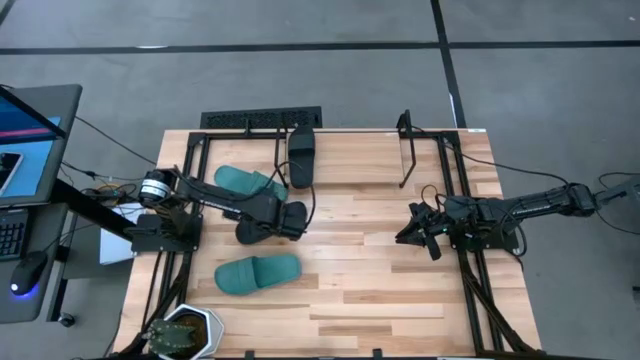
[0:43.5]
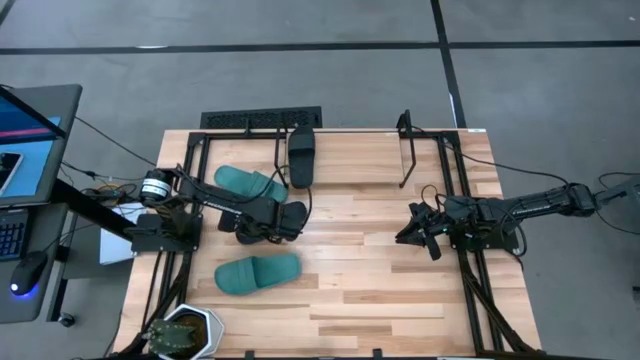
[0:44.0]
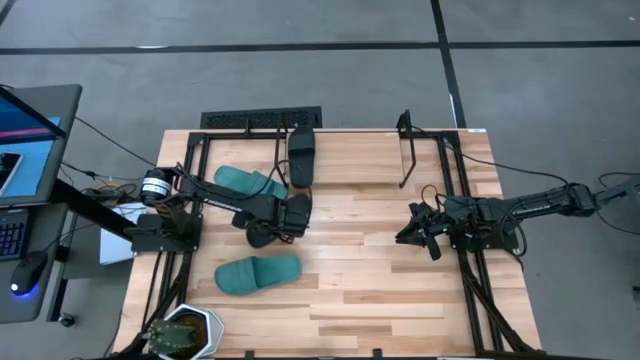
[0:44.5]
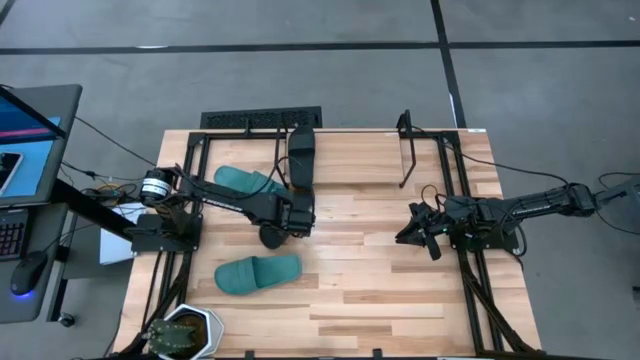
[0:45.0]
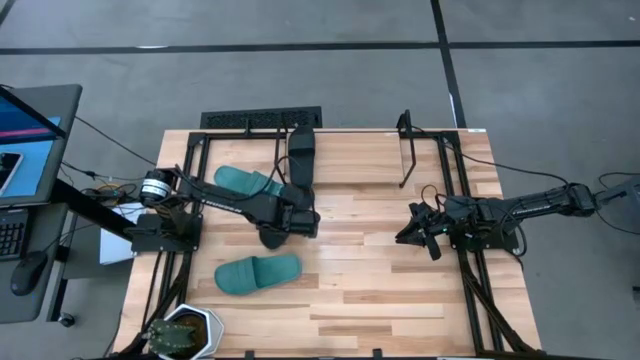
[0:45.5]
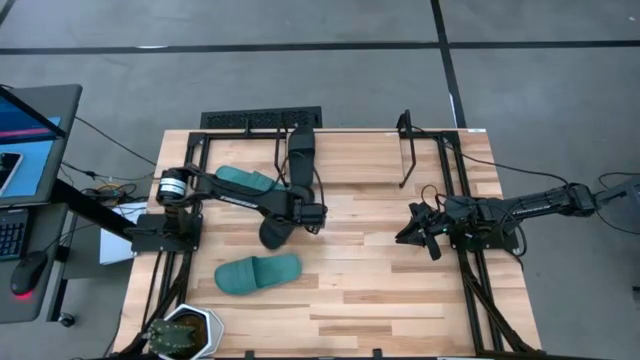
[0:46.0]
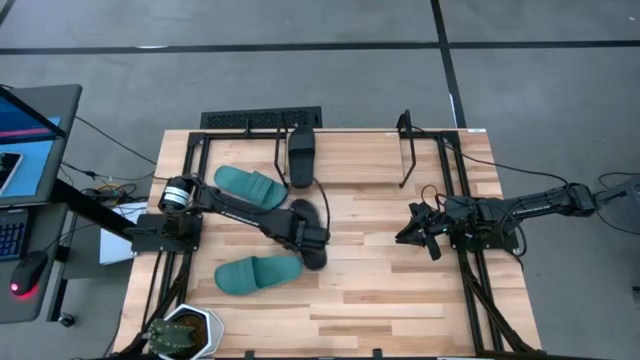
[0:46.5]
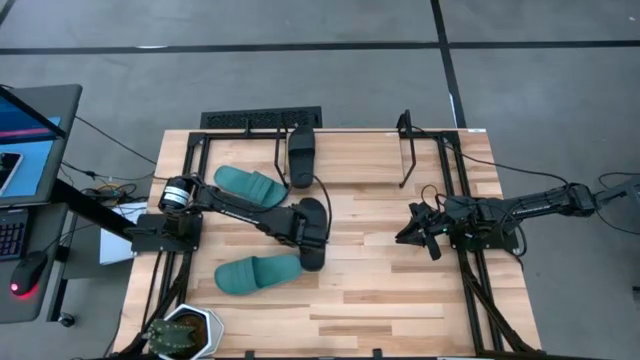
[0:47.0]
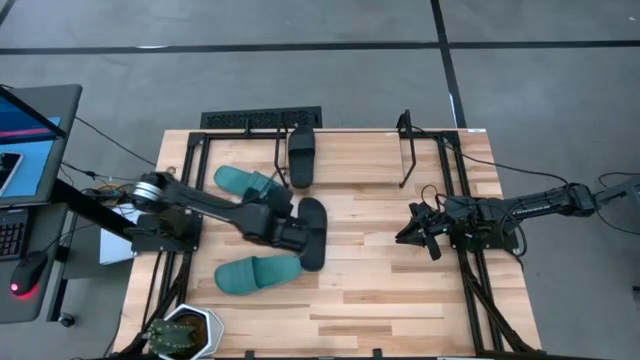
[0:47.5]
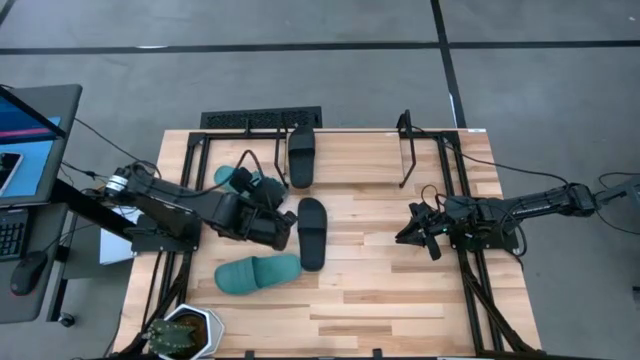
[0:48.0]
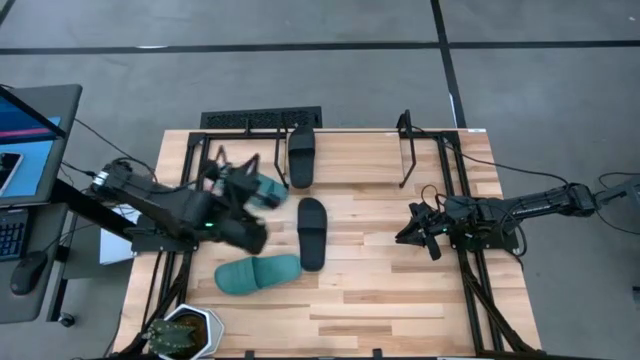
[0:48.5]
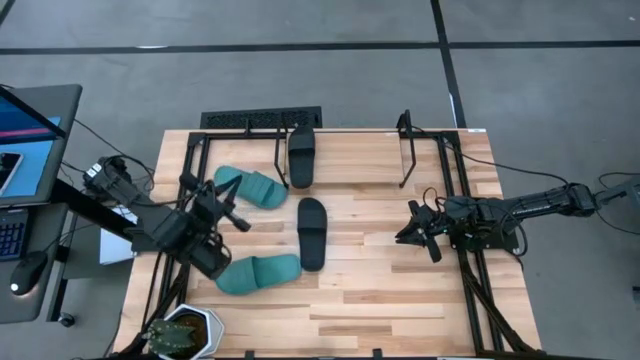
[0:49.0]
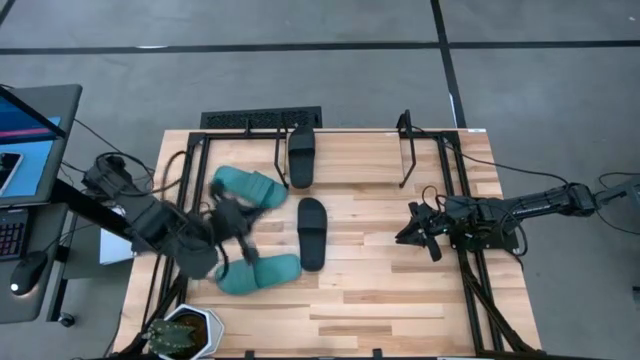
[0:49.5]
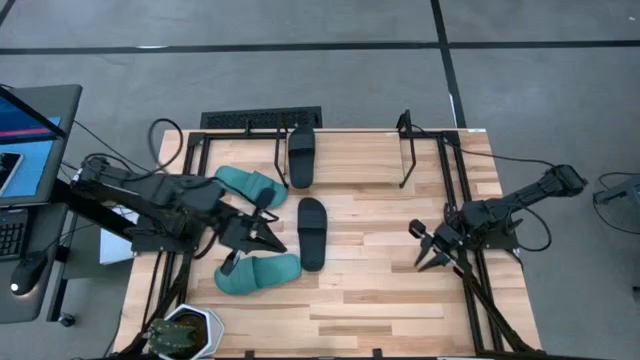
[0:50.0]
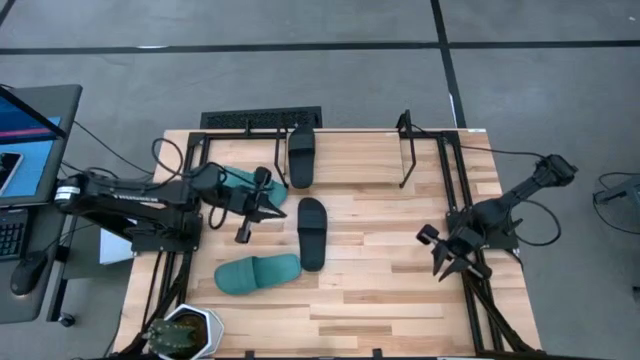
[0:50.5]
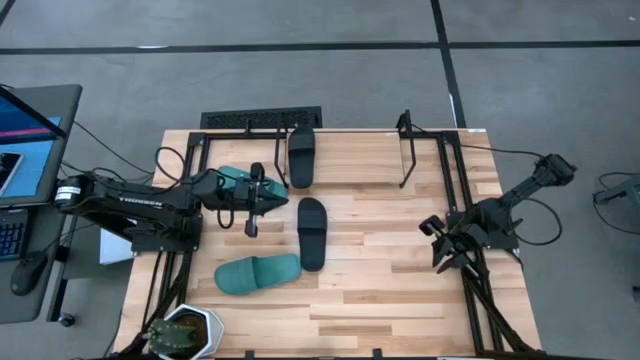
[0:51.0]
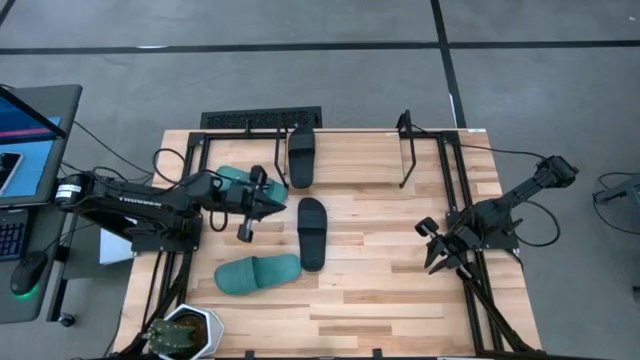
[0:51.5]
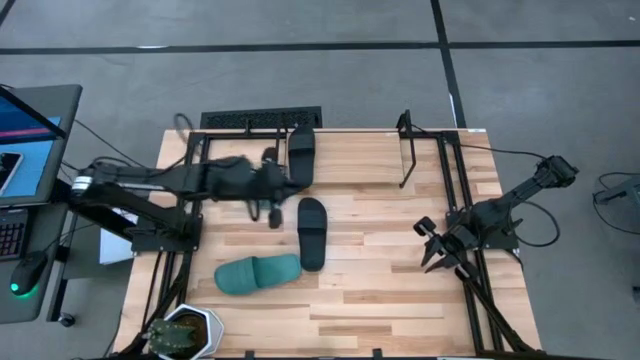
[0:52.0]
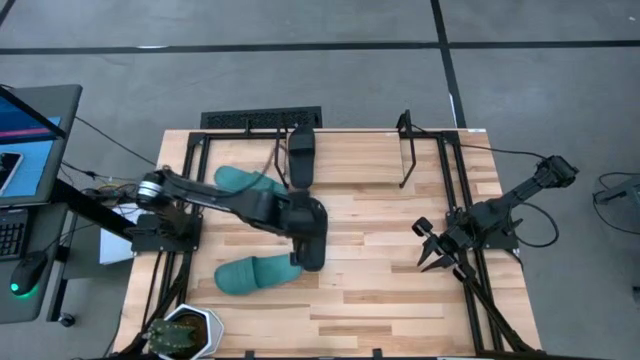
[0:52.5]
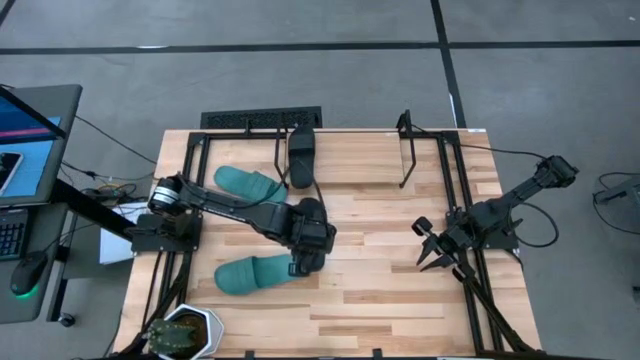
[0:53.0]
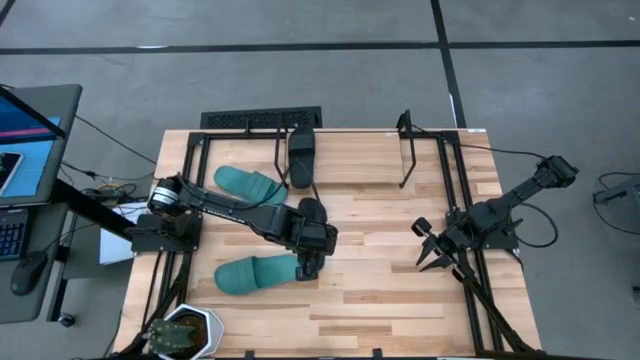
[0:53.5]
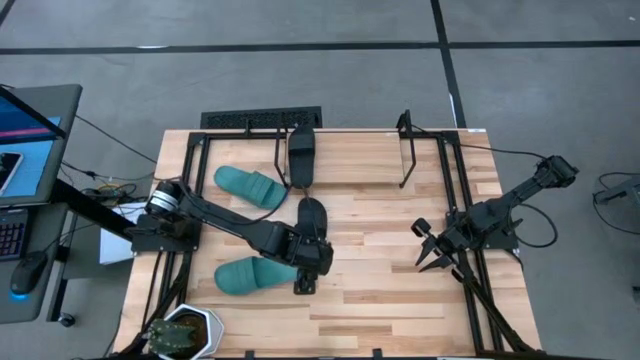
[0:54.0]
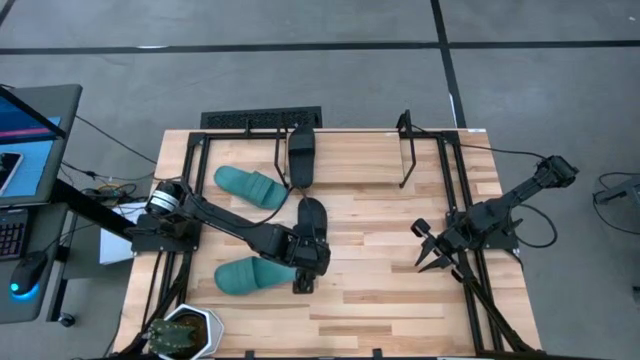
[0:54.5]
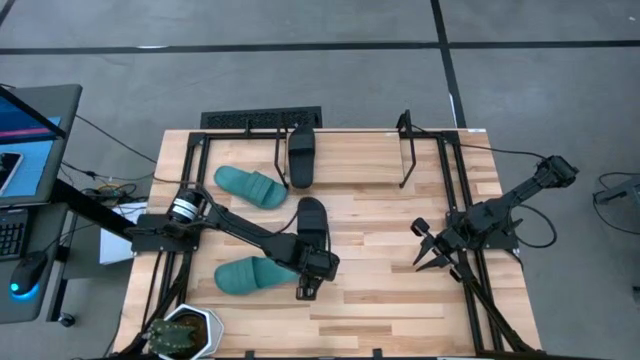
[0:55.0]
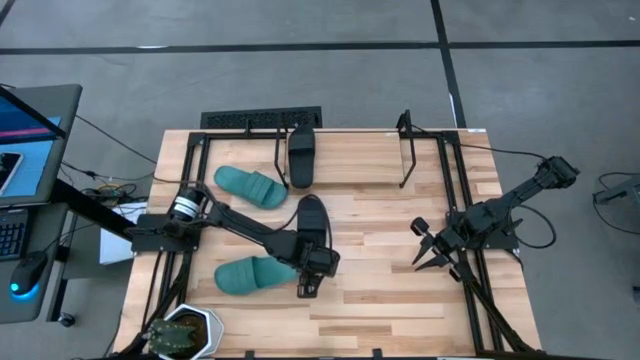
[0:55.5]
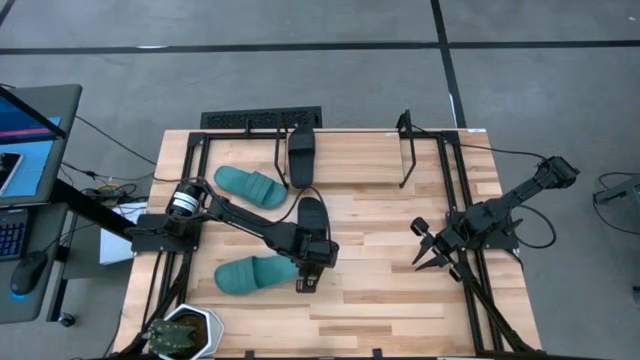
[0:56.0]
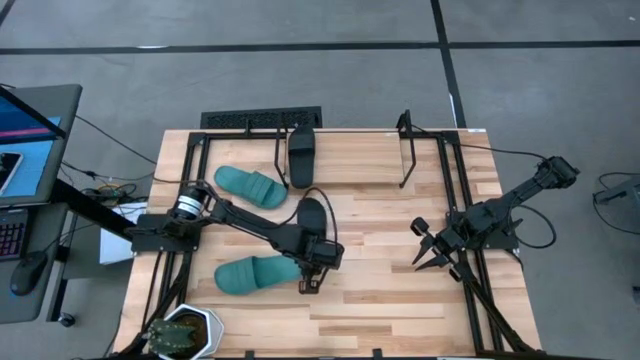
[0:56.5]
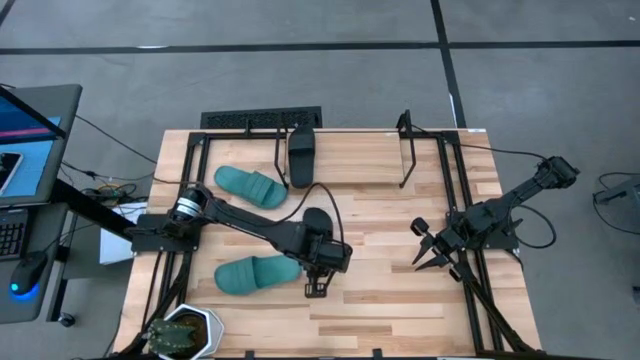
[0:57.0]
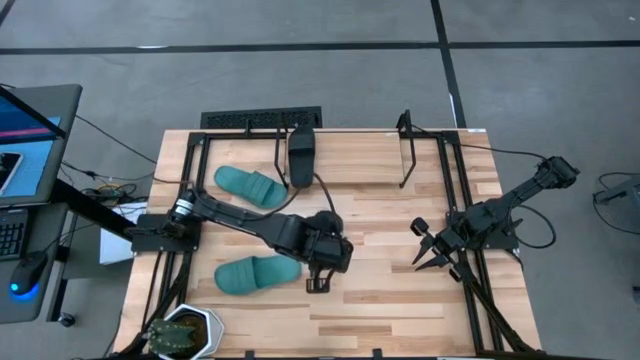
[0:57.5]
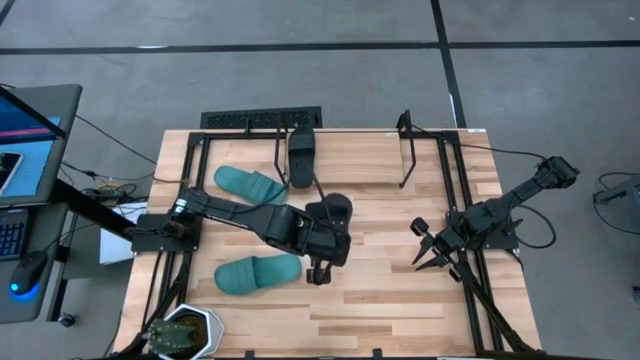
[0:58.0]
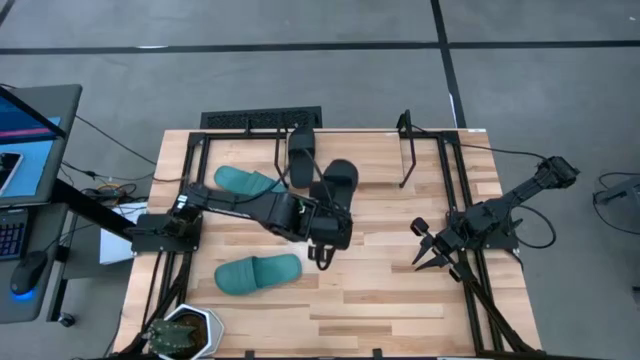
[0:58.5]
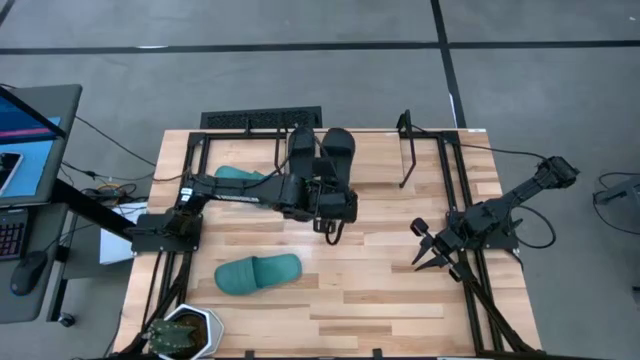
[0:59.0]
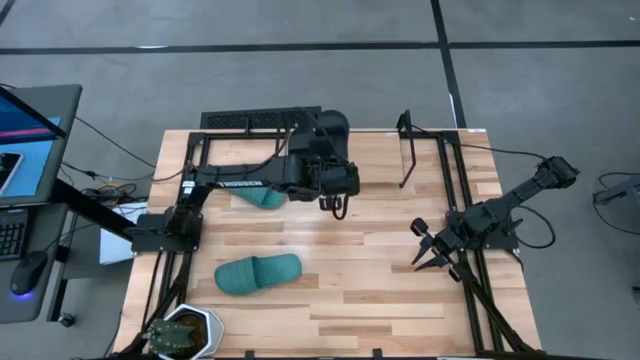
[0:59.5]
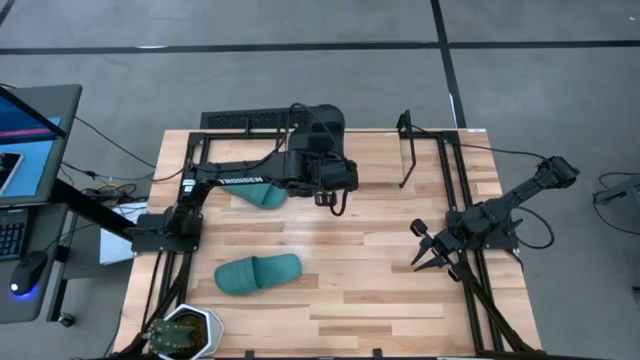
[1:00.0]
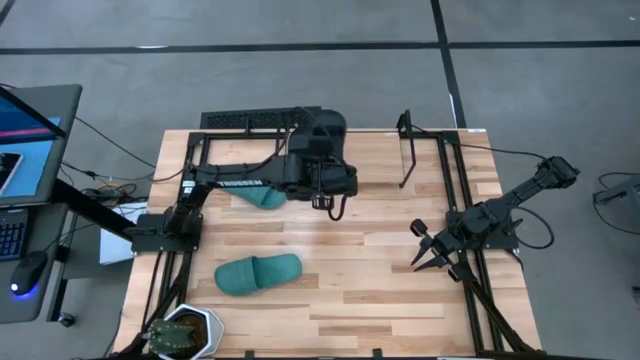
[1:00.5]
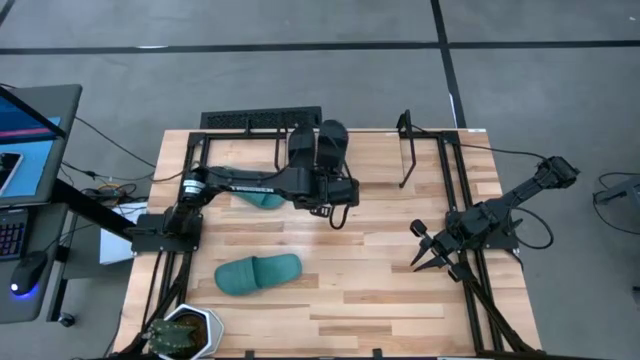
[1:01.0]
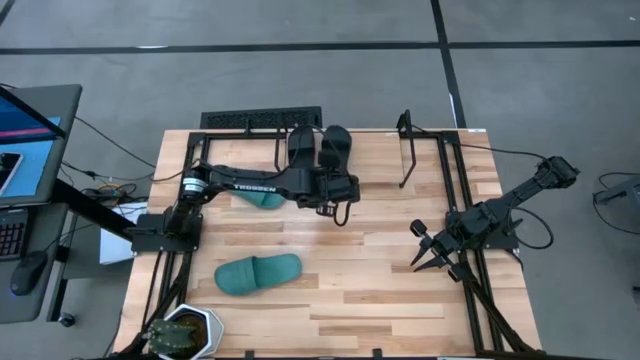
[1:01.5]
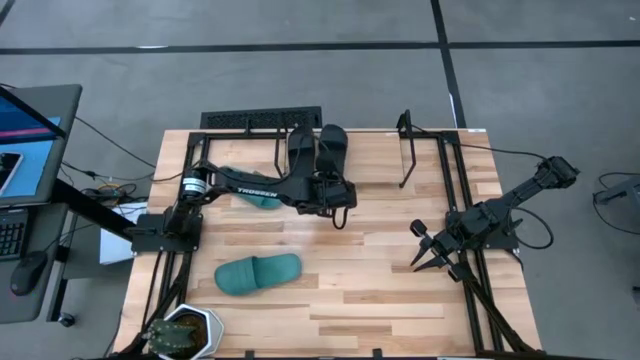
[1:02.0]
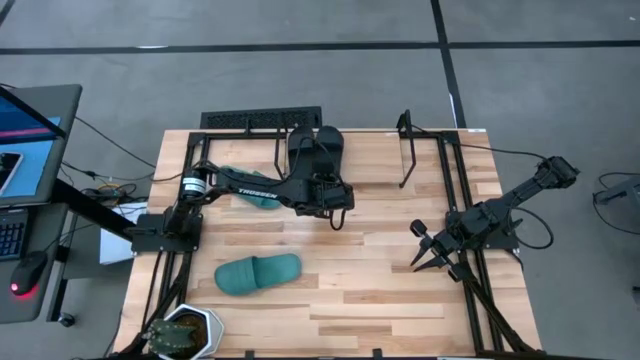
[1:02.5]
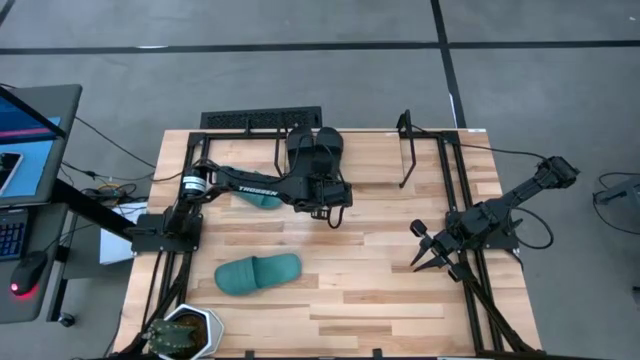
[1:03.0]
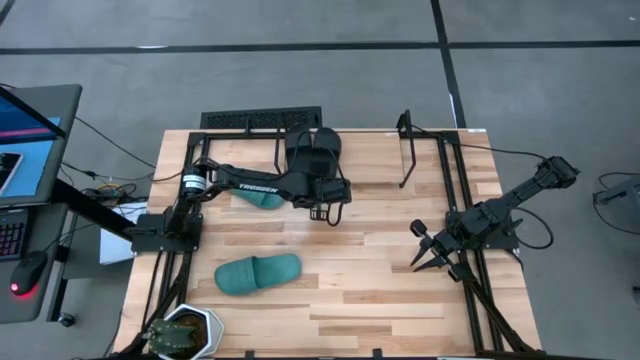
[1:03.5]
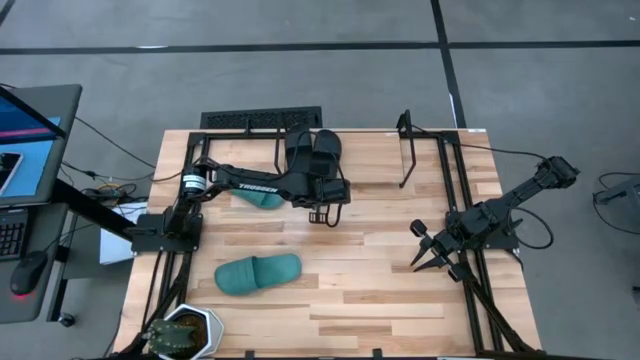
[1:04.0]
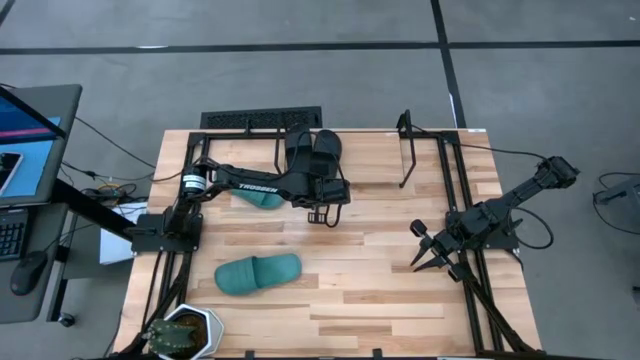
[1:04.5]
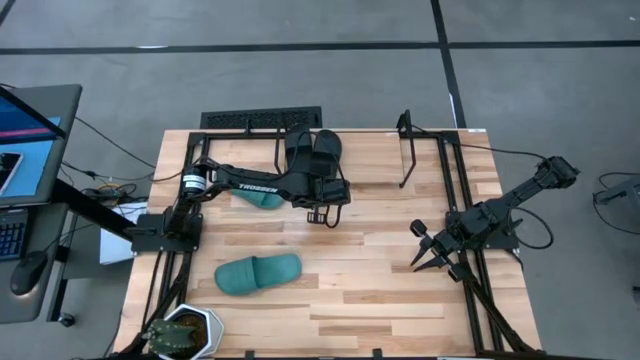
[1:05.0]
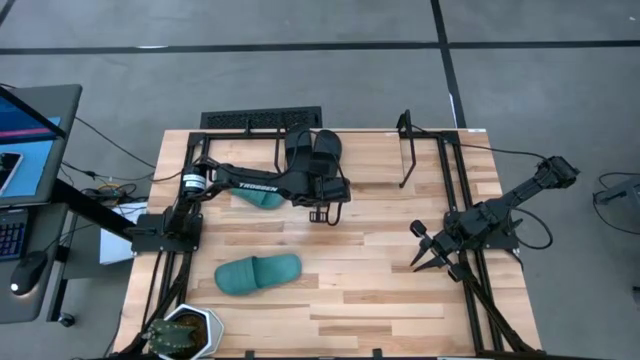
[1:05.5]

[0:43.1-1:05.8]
Task: Pick and place slides into the shelf
Put the black slipper on the shelf
